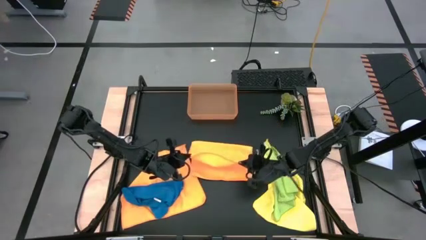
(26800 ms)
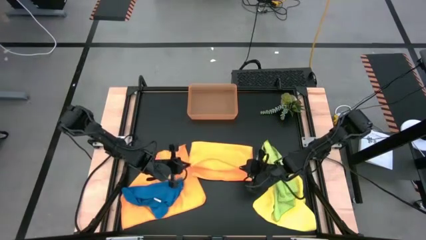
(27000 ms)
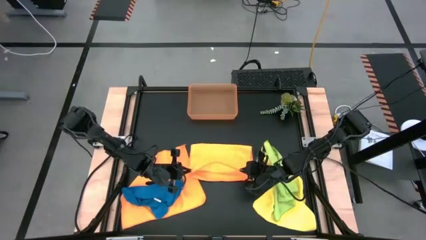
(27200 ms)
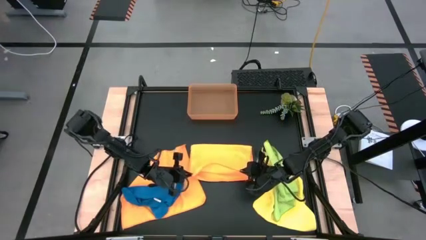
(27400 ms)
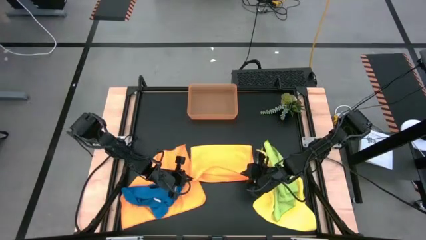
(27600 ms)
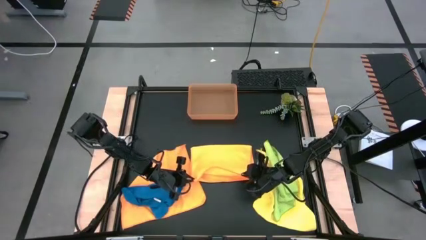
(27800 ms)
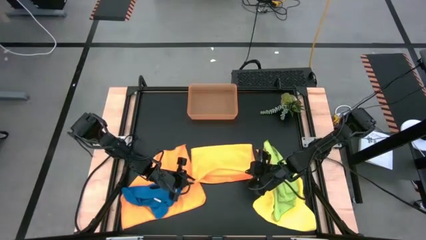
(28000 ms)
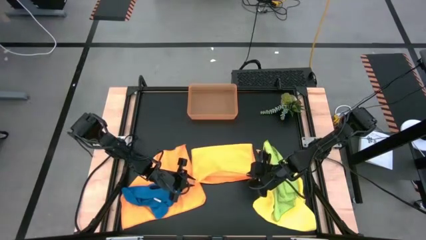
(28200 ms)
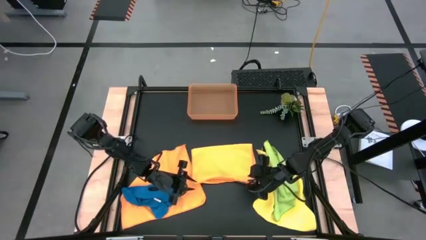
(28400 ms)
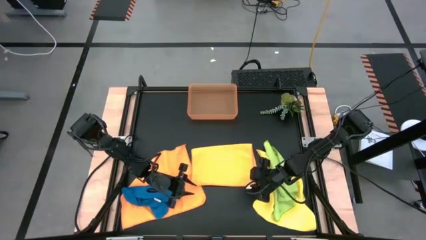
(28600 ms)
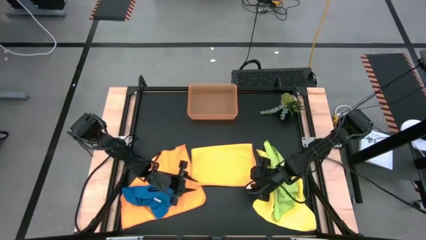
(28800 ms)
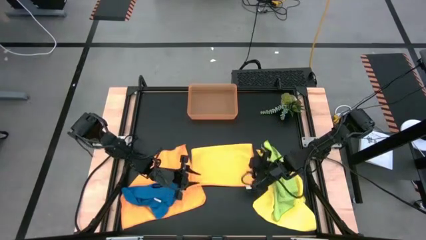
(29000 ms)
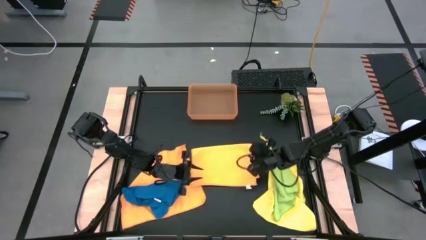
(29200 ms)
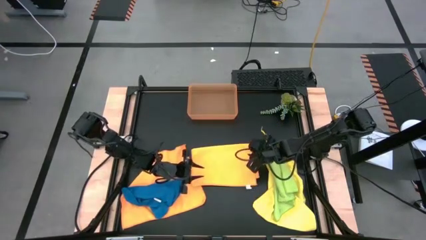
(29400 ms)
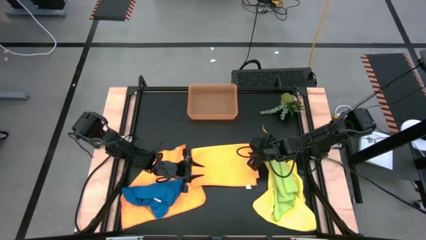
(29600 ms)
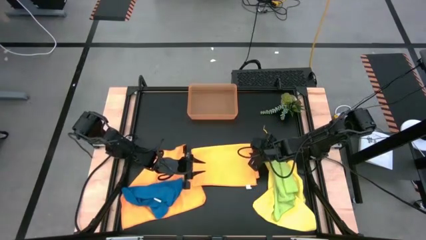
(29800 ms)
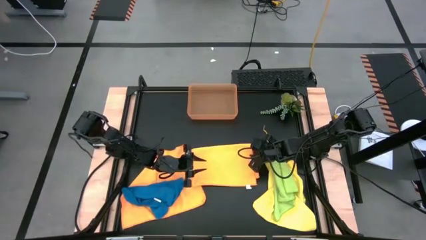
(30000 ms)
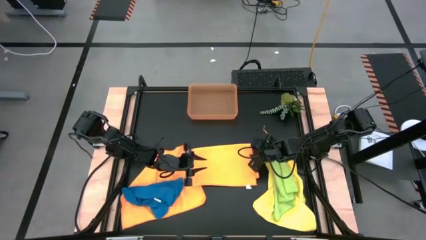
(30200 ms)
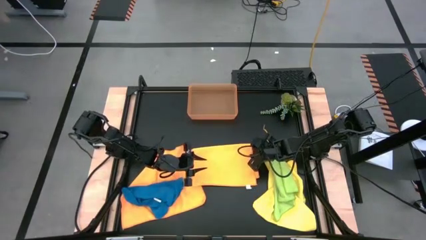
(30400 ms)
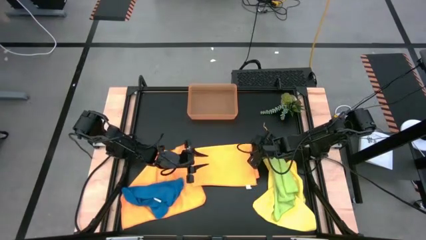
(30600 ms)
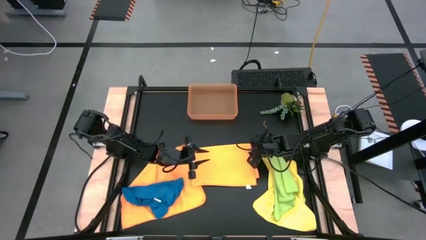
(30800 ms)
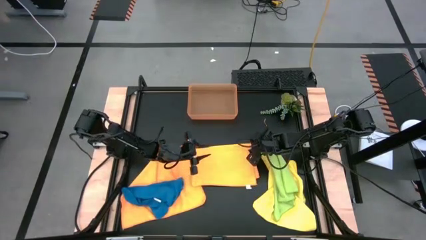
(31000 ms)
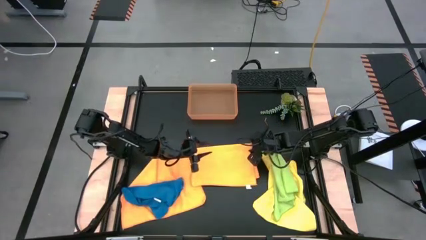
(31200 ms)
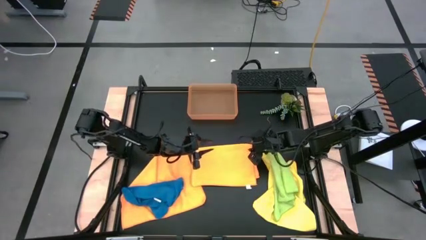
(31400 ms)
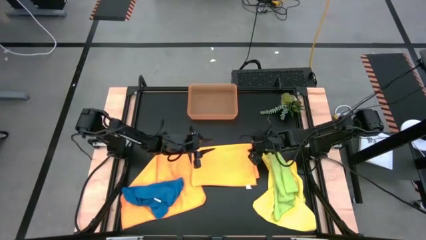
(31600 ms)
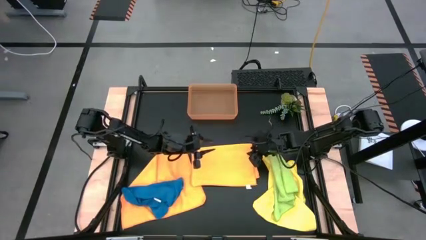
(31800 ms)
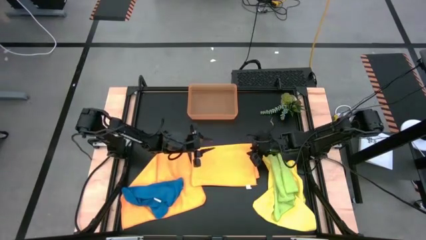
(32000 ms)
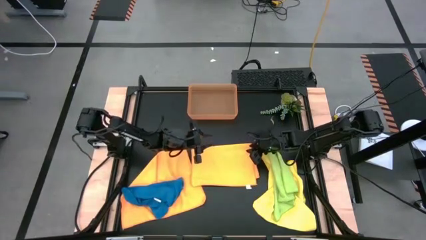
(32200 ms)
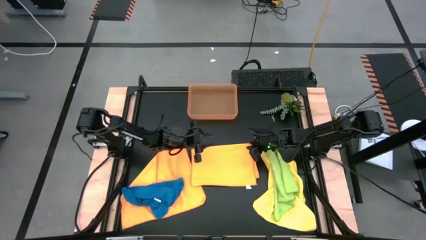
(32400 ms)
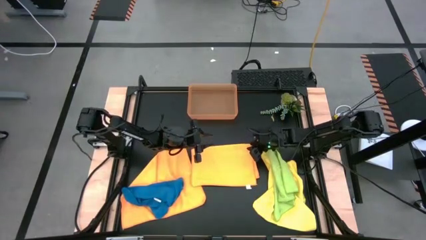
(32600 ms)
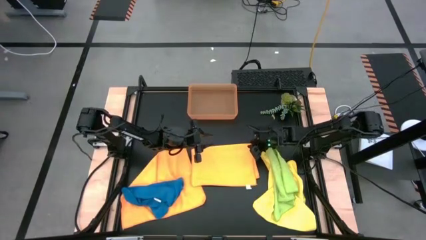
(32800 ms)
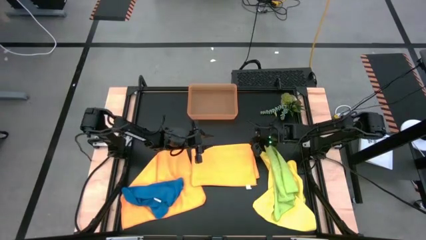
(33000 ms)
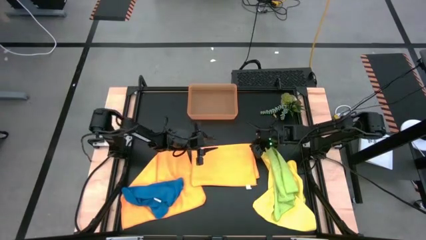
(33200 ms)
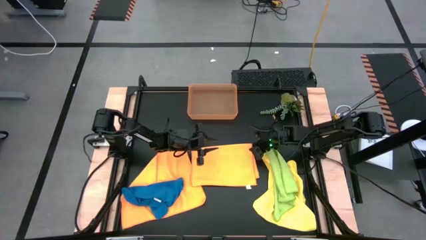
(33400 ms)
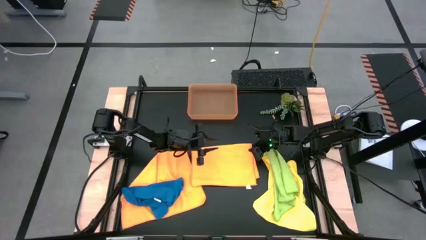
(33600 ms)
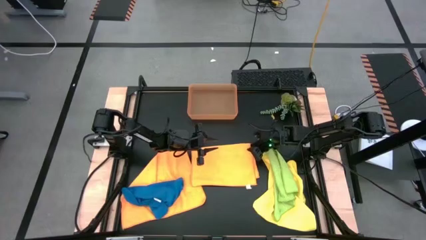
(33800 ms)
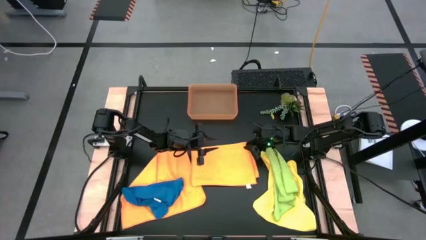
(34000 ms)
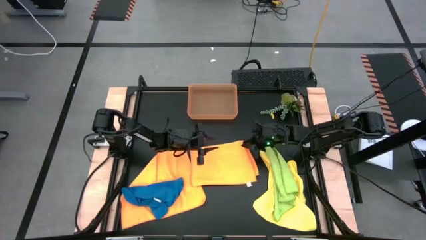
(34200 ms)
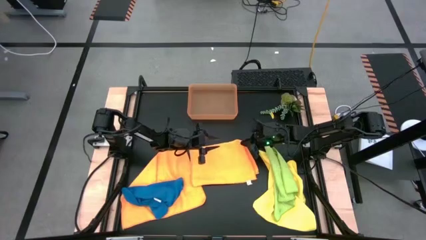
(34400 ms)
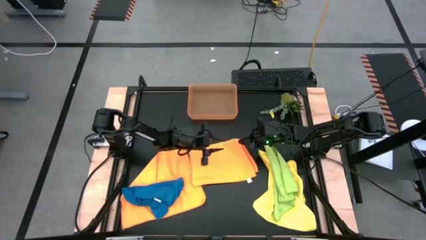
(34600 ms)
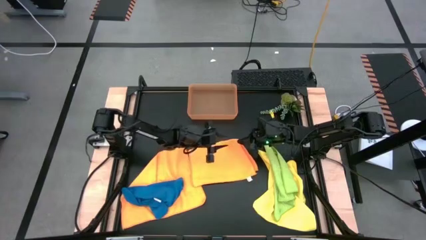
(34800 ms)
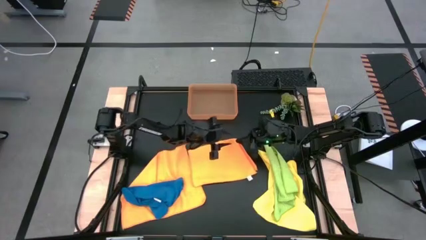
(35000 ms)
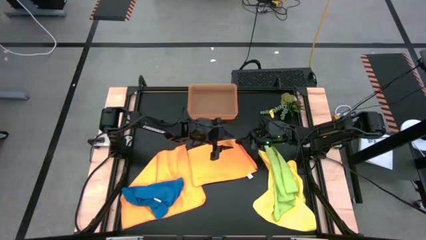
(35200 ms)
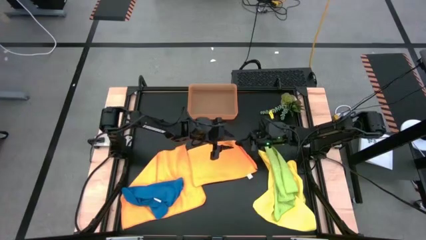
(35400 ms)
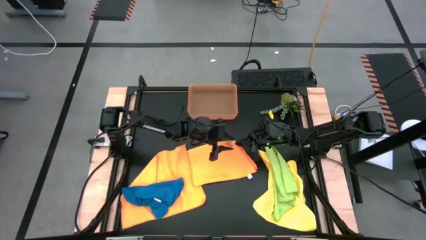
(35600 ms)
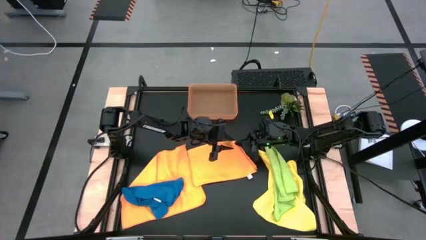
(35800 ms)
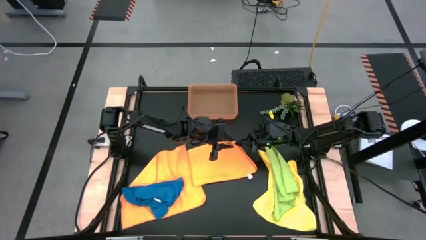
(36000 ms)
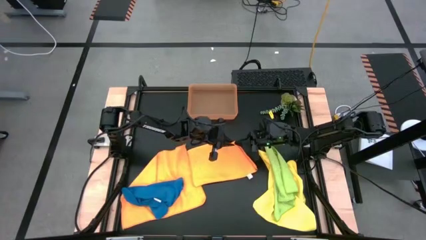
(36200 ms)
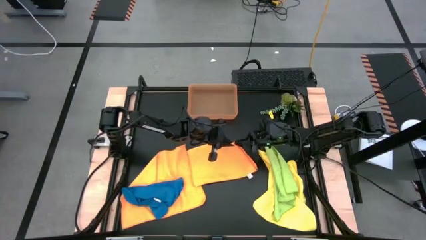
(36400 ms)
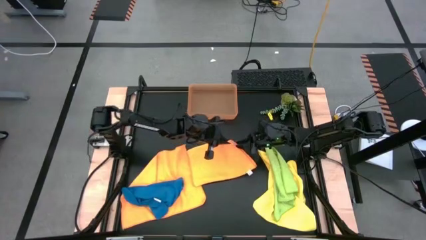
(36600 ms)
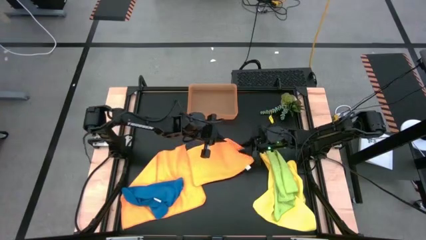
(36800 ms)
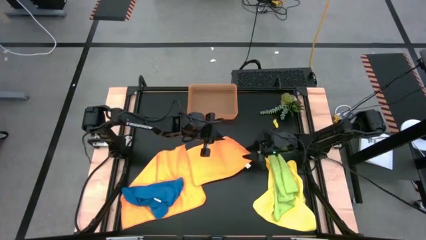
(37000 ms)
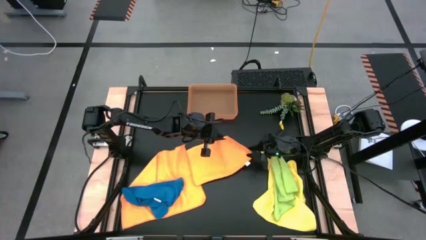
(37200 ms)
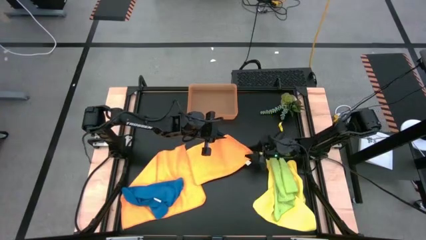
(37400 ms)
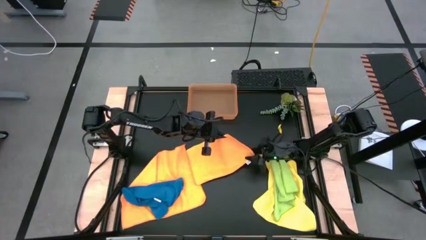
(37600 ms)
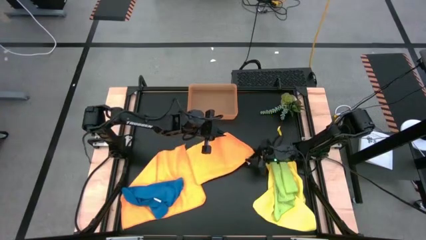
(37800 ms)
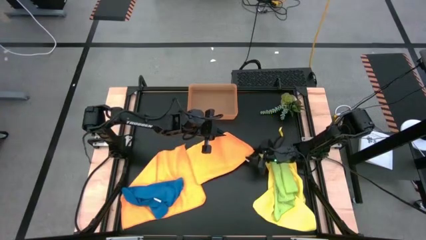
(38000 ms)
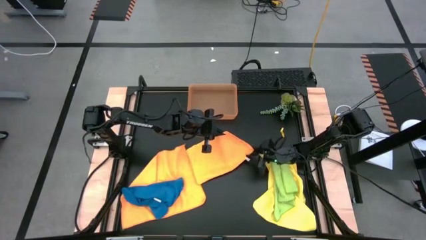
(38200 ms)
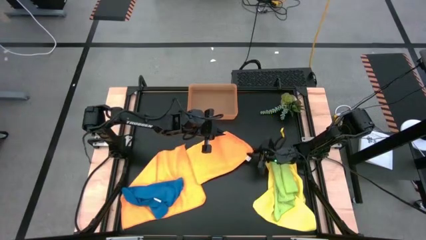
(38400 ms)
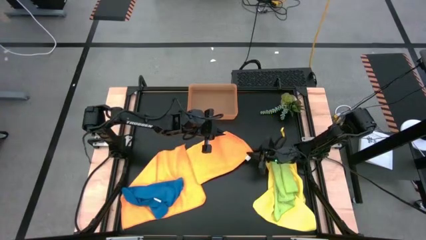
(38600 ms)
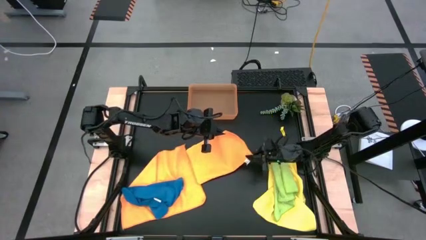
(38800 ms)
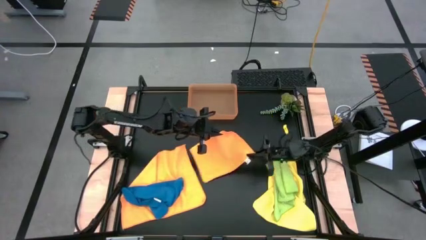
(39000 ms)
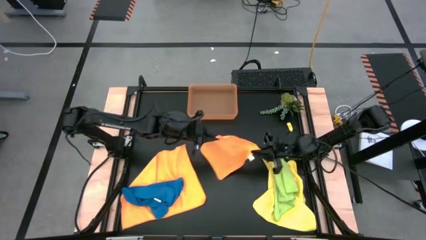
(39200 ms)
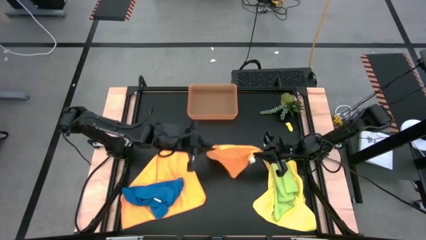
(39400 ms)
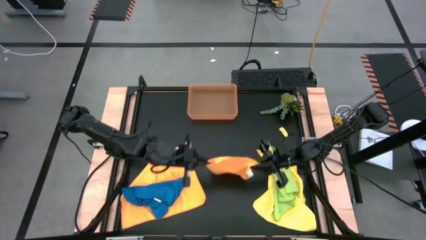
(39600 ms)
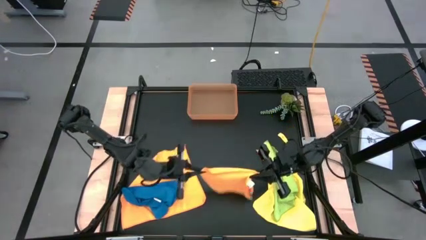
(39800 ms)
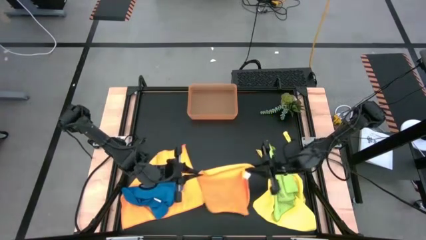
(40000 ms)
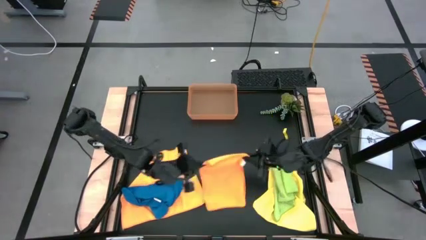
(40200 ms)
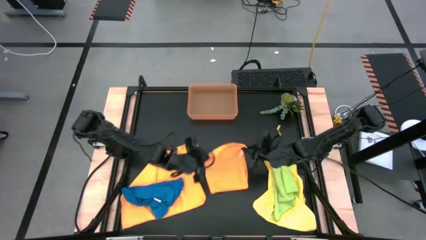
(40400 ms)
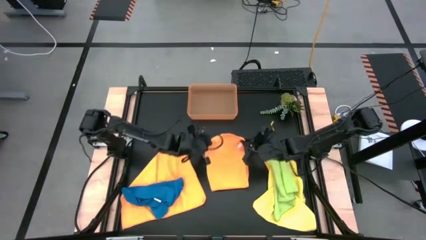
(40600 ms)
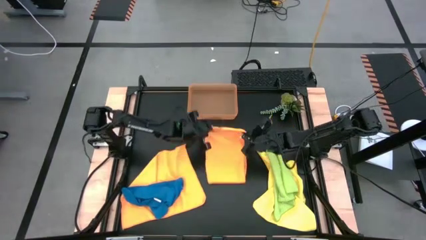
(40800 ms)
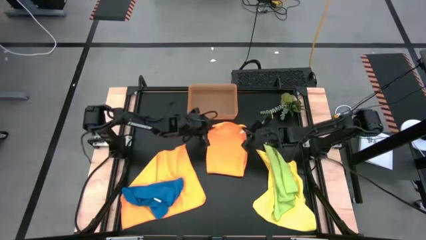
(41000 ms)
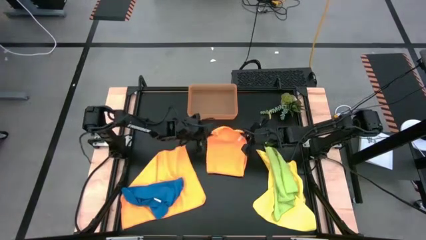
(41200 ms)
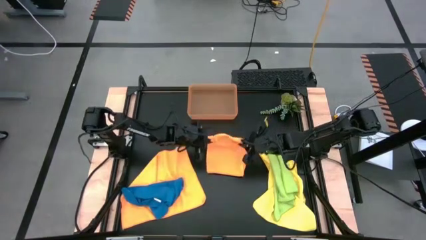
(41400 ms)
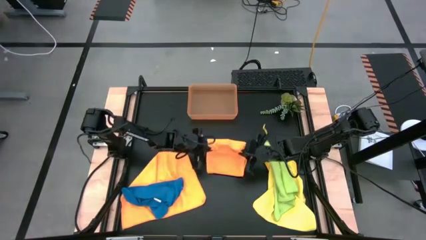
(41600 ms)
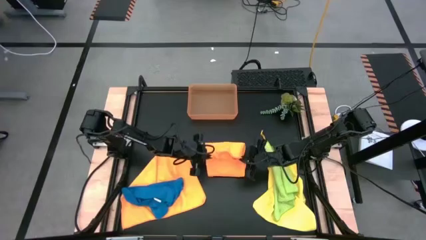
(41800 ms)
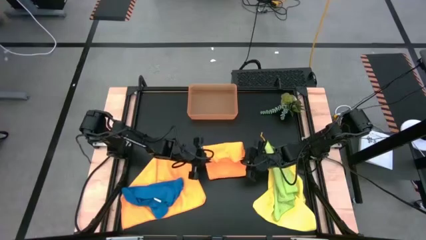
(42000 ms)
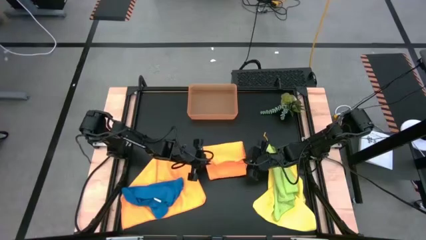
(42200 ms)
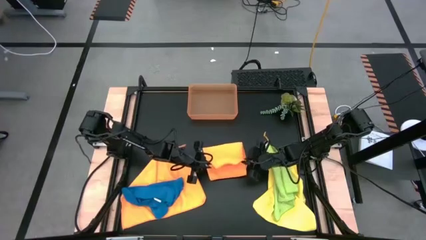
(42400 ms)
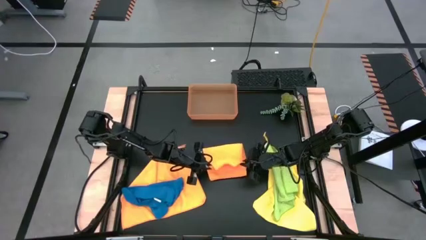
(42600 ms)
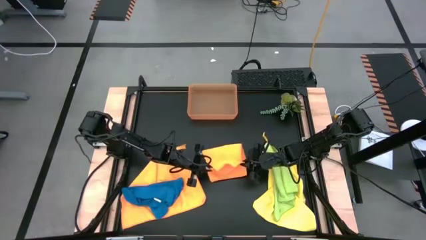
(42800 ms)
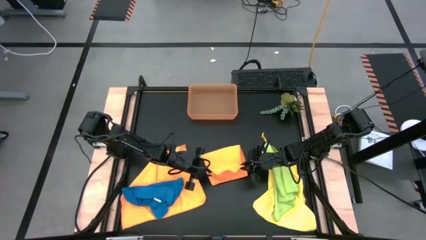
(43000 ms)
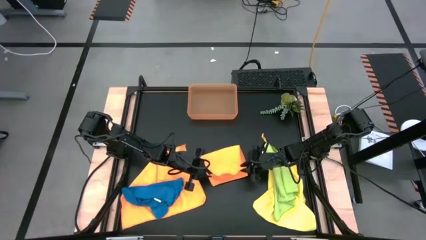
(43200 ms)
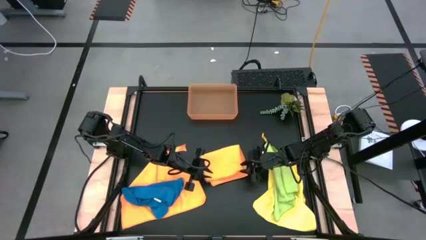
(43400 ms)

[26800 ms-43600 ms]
Task: Fold microfiber towels
Fold the right orange towel
